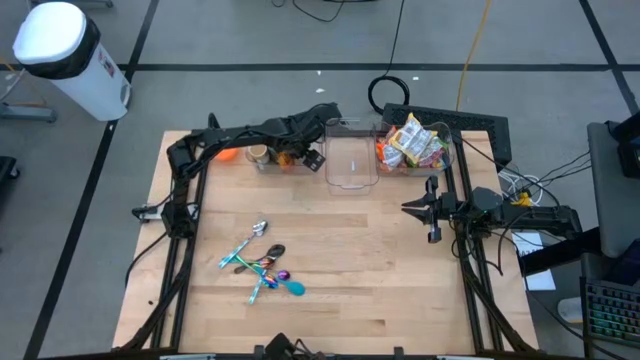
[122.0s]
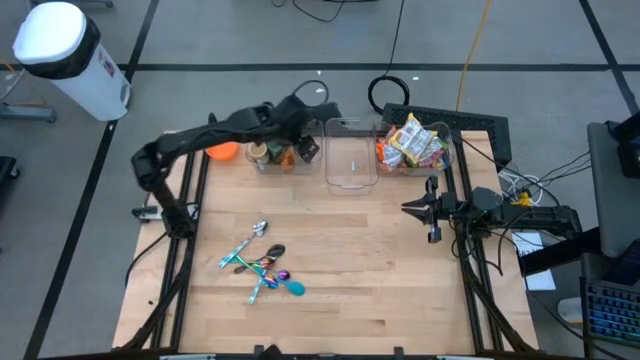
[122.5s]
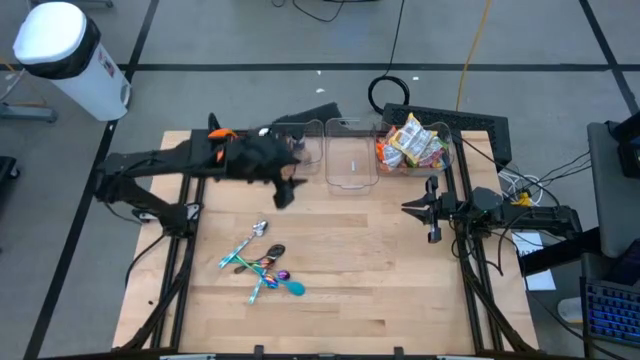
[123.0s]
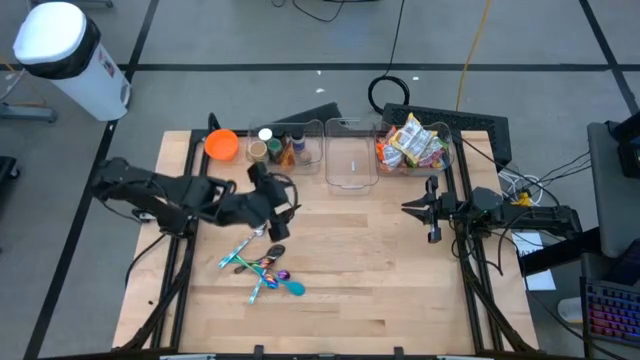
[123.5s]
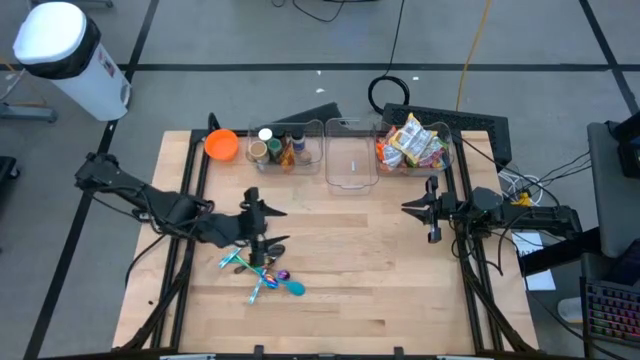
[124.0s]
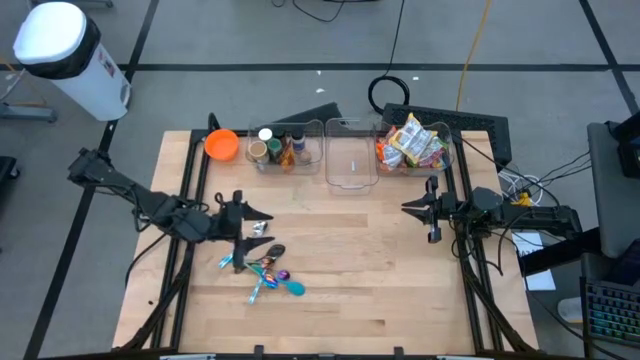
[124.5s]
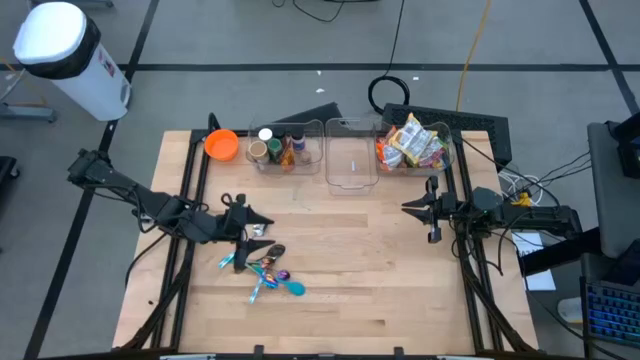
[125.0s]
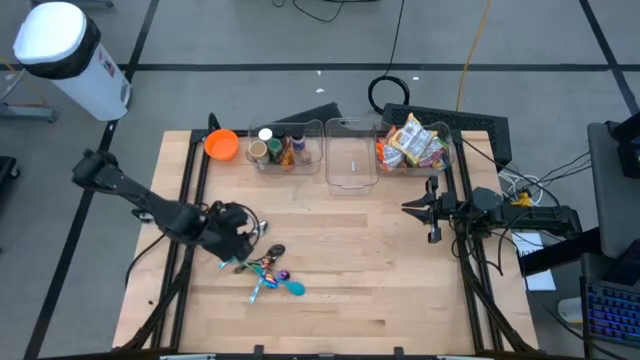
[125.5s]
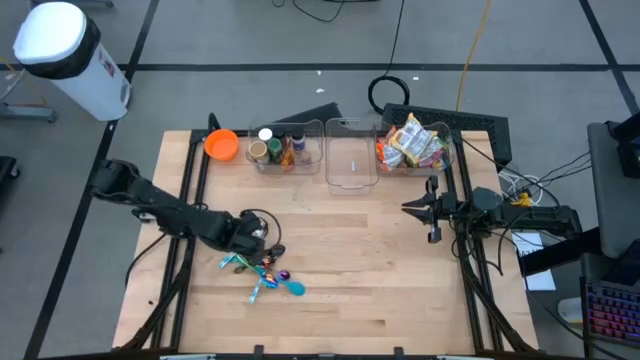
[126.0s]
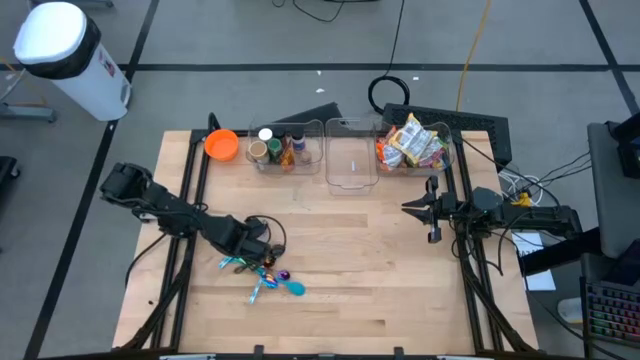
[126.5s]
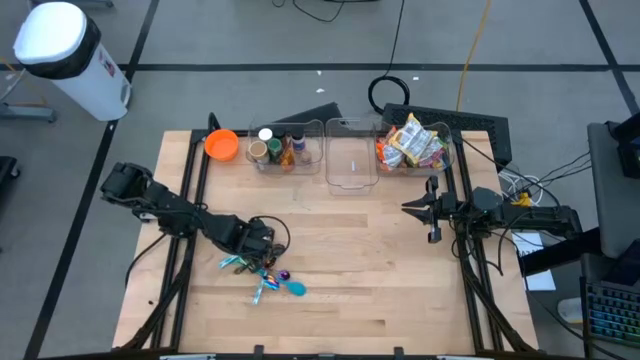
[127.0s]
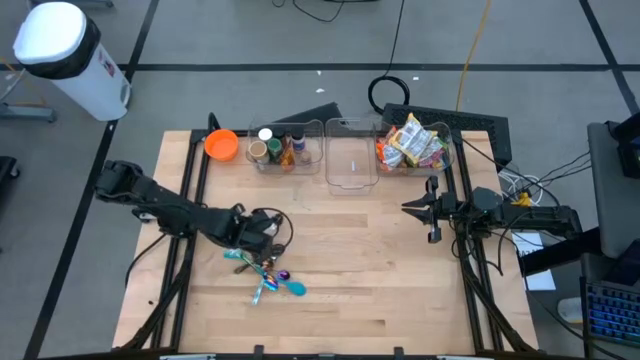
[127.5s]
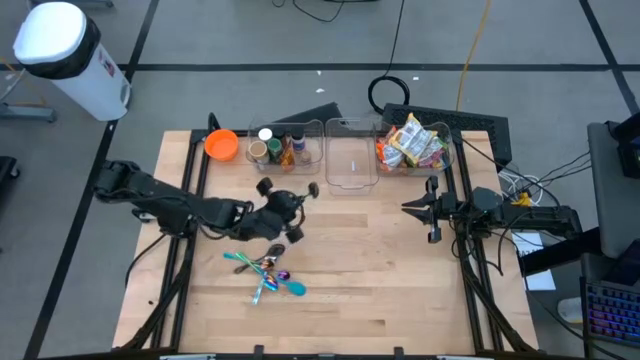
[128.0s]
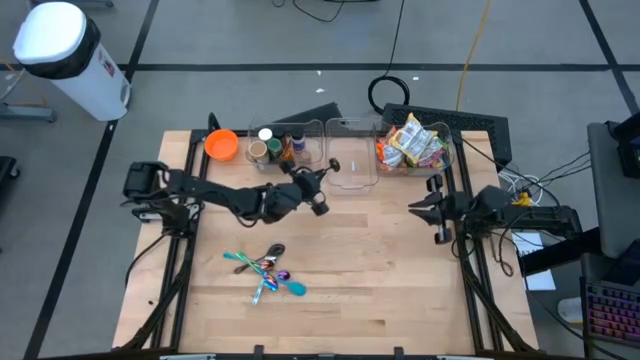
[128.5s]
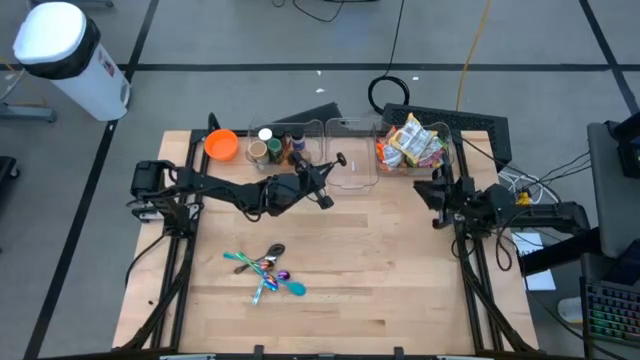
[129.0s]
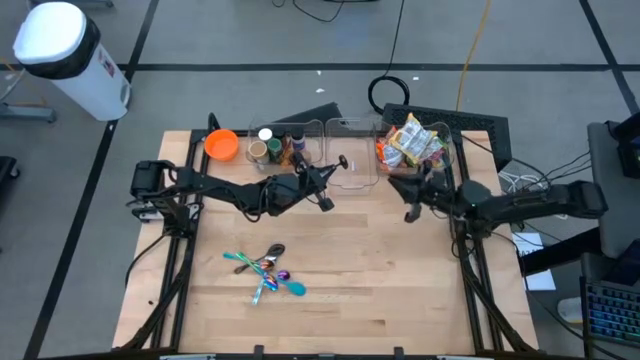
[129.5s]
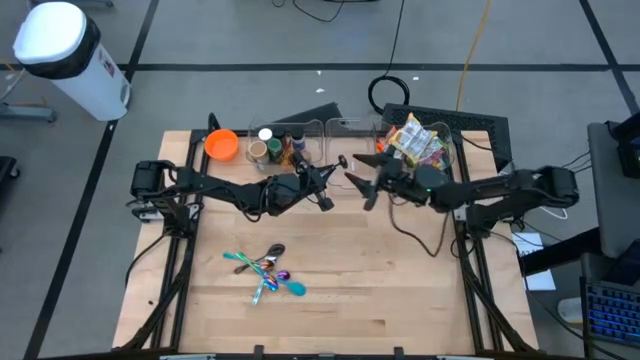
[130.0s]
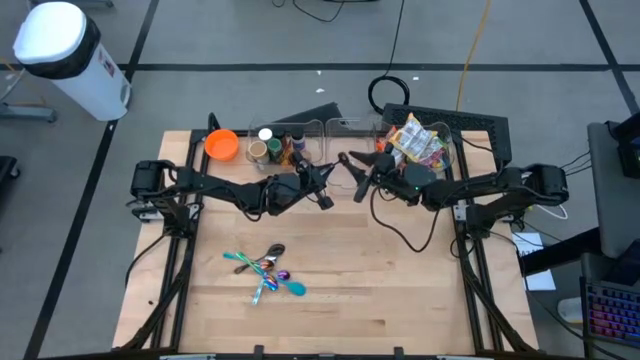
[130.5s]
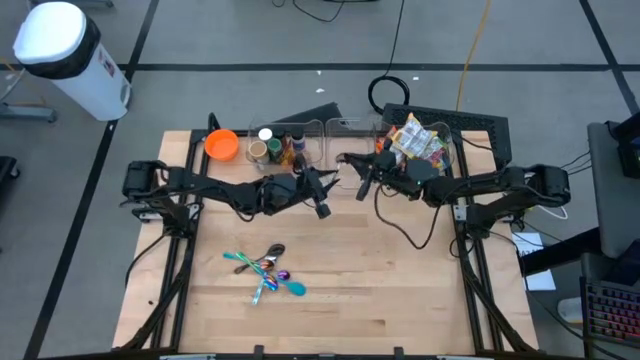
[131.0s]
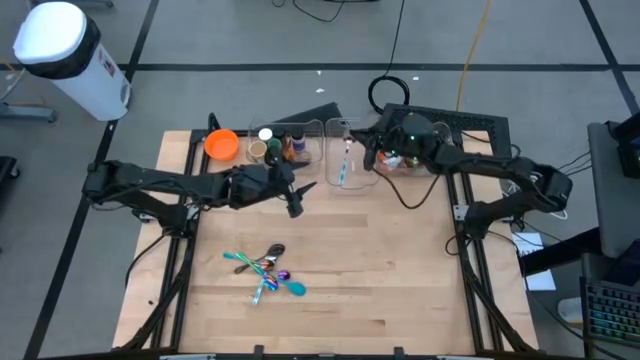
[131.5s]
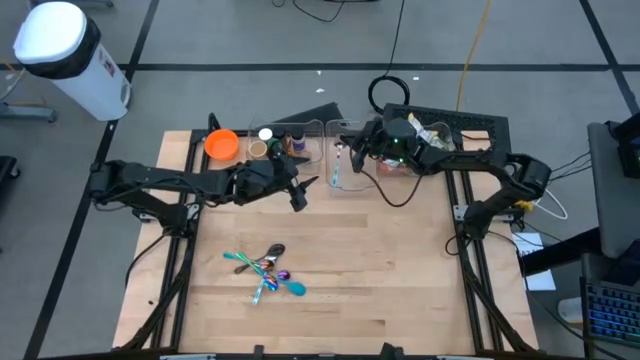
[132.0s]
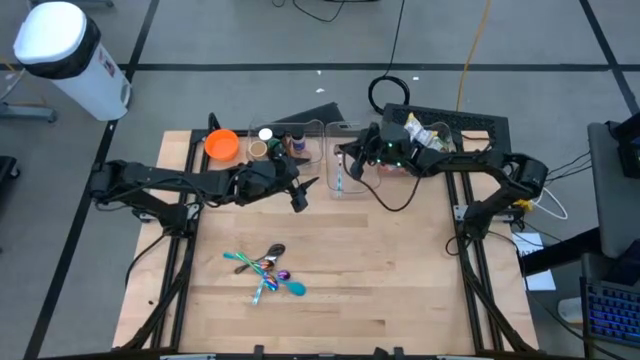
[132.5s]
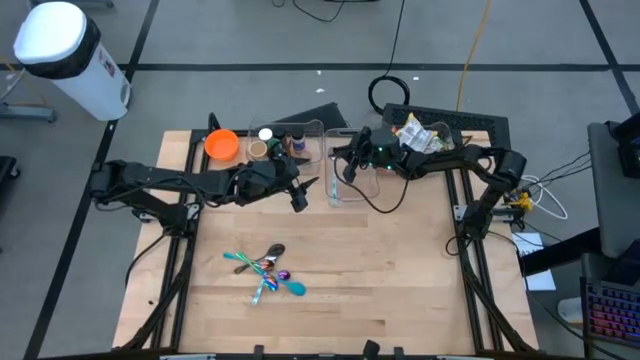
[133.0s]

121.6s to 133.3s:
Task: Pick & Place Food Item
Put the right blue pattern spoon into the center transparent bin

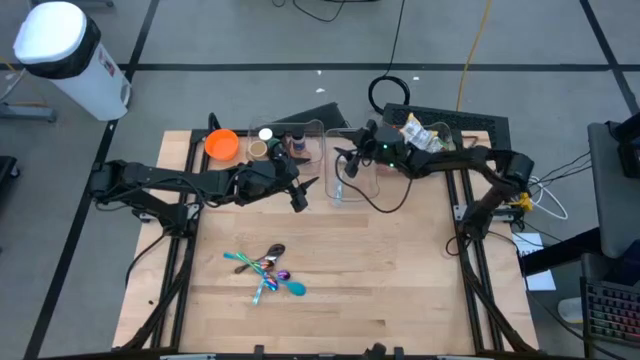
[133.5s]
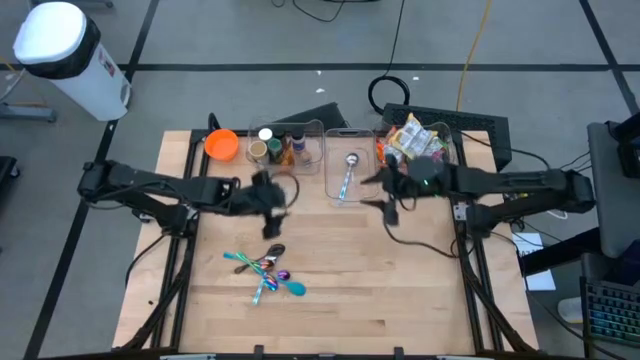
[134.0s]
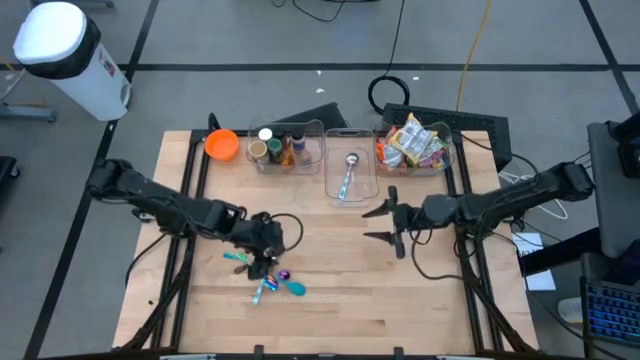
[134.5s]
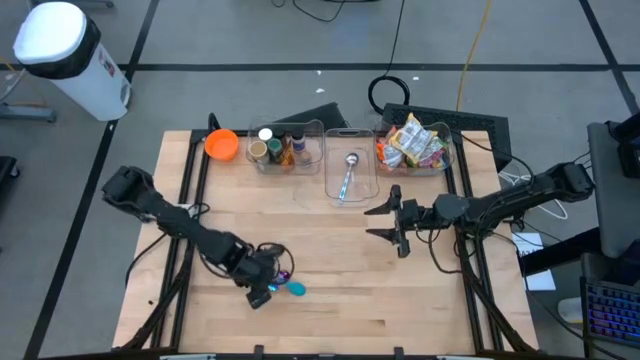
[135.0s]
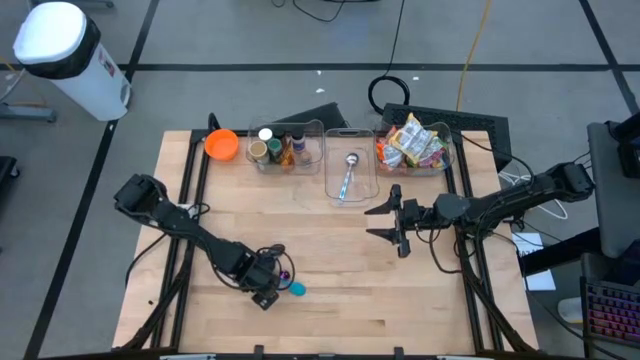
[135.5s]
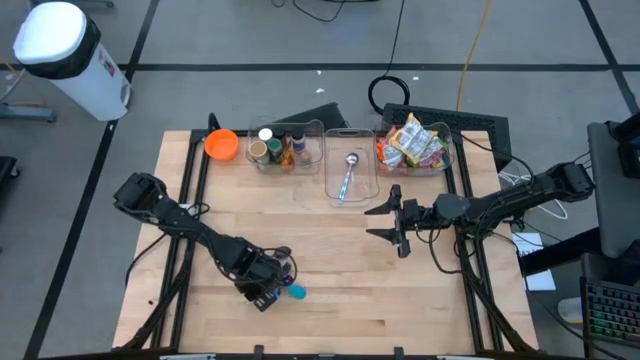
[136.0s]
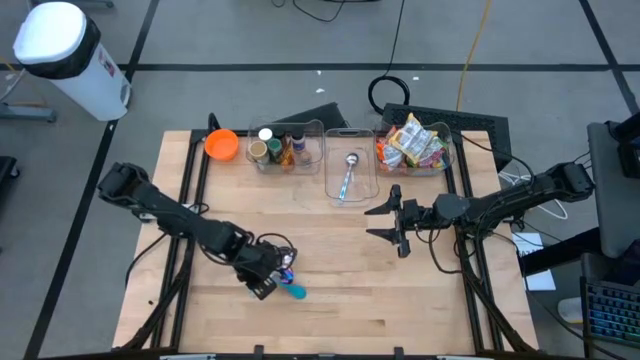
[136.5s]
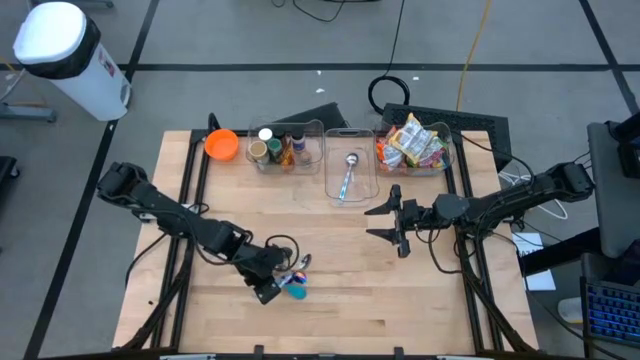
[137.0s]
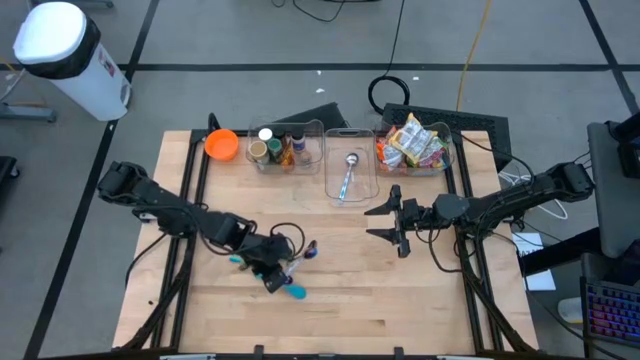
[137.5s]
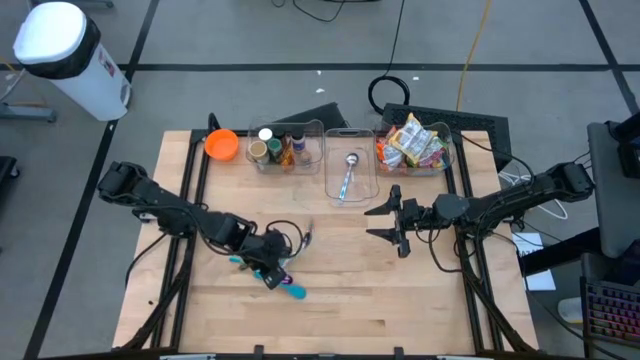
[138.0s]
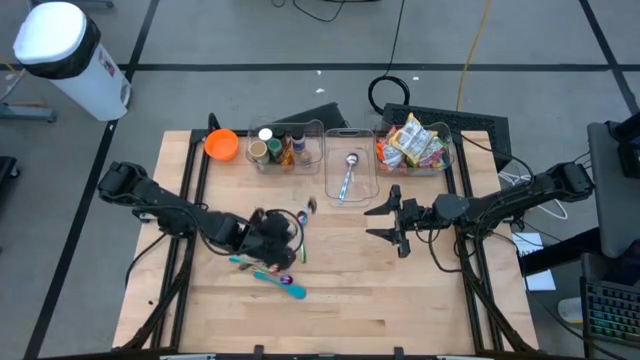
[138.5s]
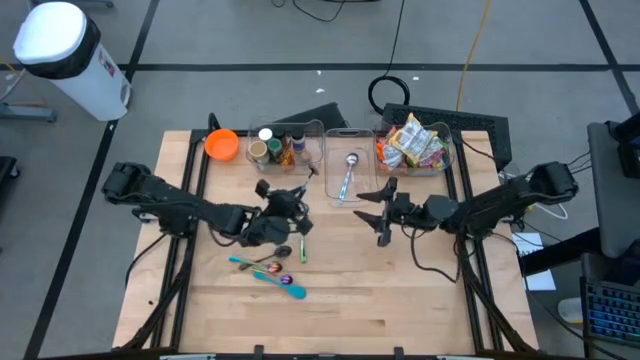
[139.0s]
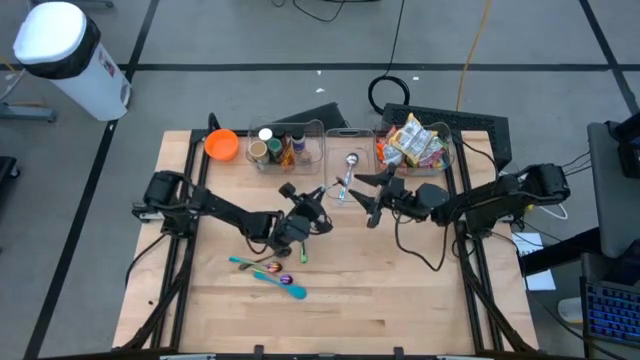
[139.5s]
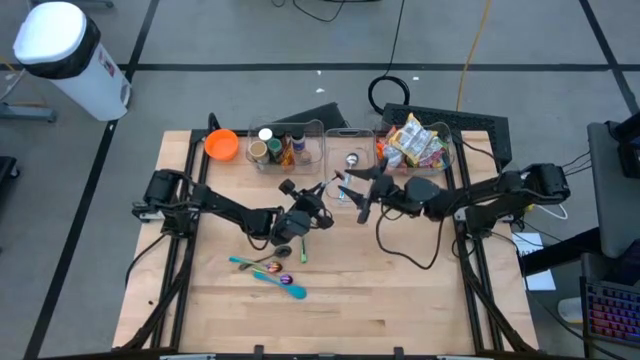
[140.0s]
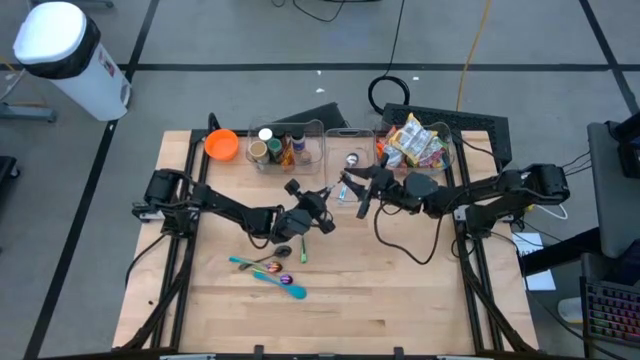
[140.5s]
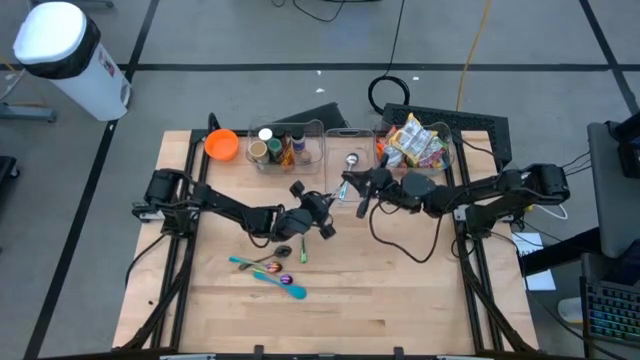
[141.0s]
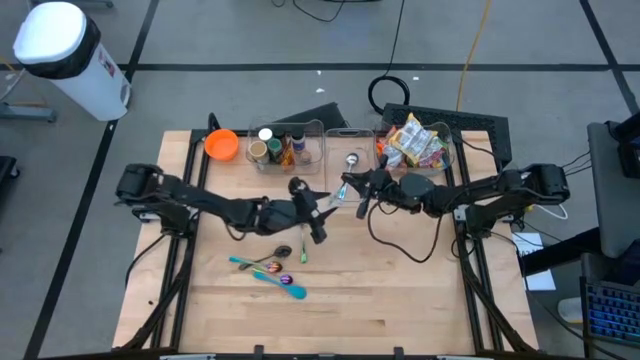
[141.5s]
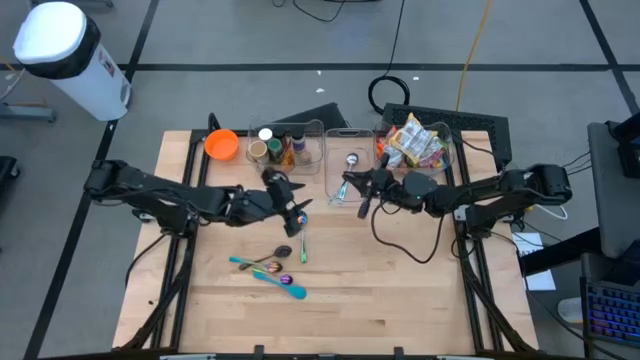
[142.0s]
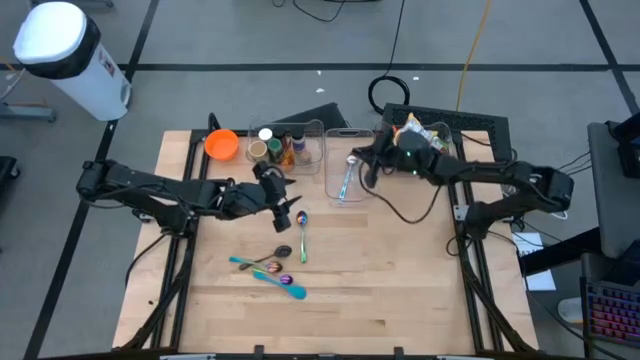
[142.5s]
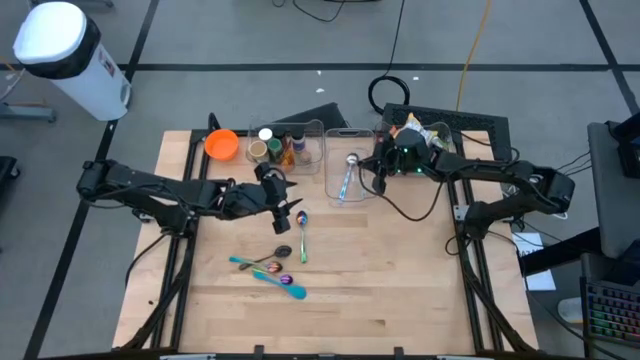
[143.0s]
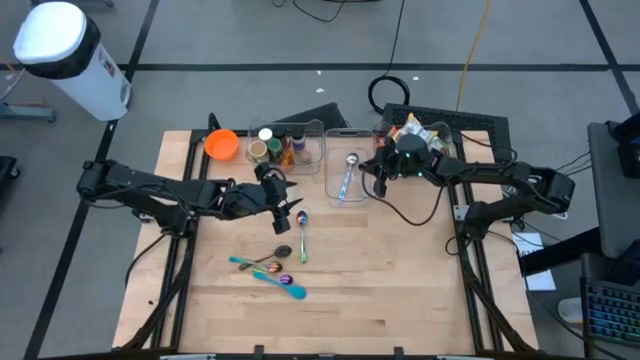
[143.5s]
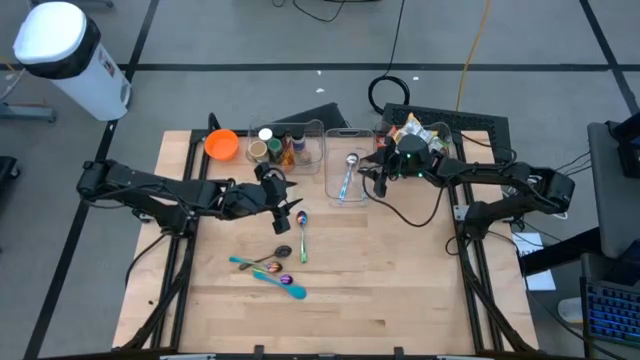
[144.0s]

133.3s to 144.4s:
Put the blue pattern spoon into the center transparent bin

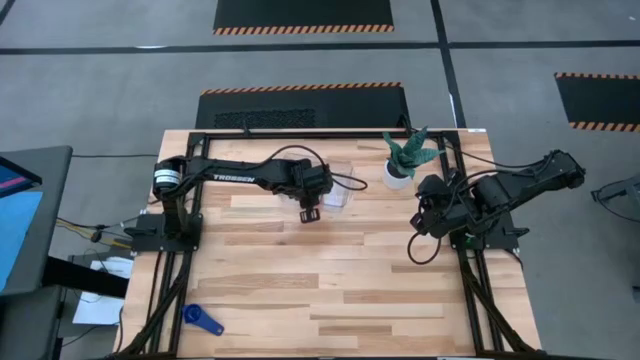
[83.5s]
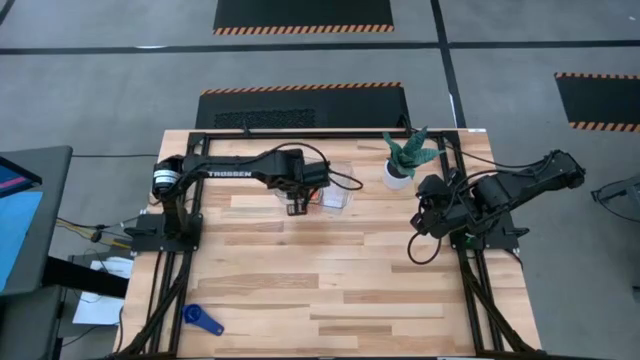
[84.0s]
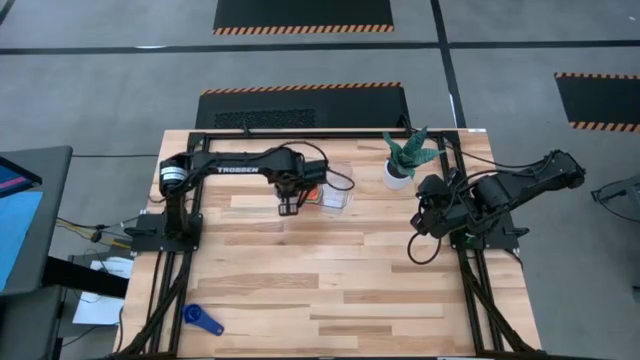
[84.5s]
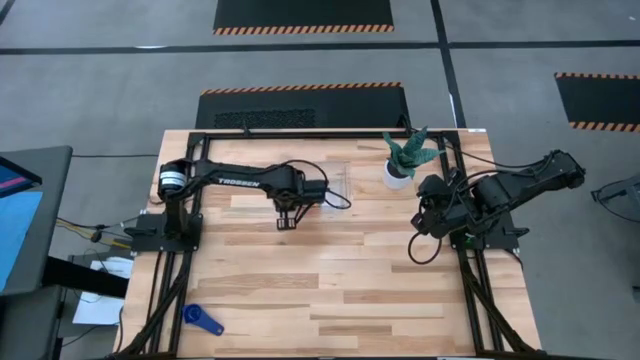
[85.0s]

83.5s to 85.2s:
Task: Nest measuring cups in basket
Adjust the transparent bin
